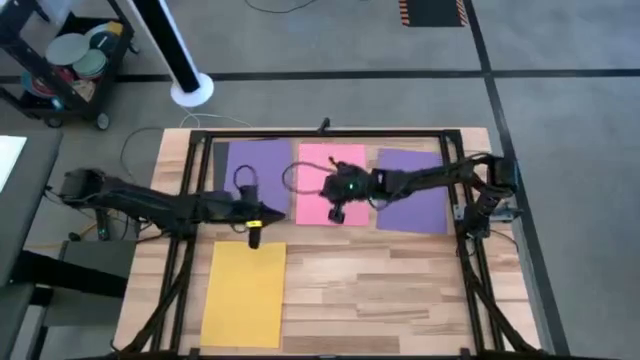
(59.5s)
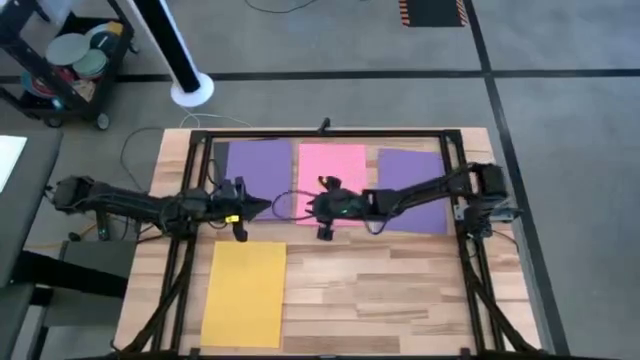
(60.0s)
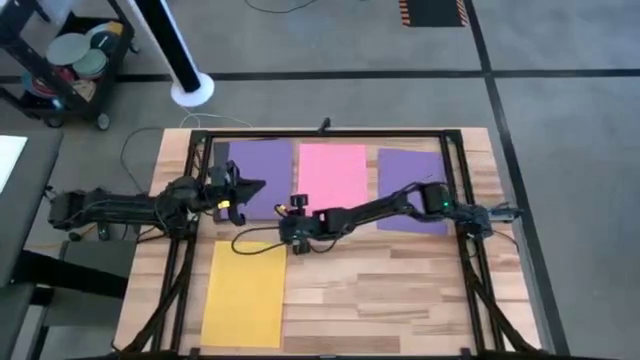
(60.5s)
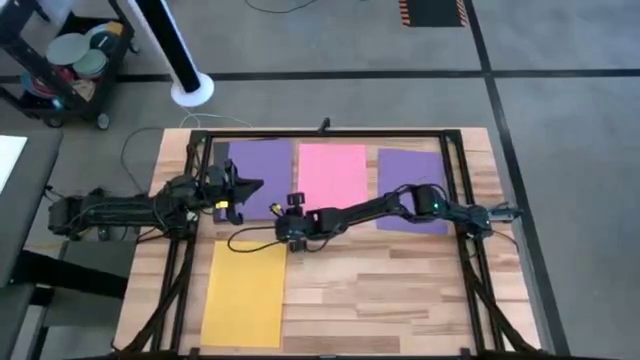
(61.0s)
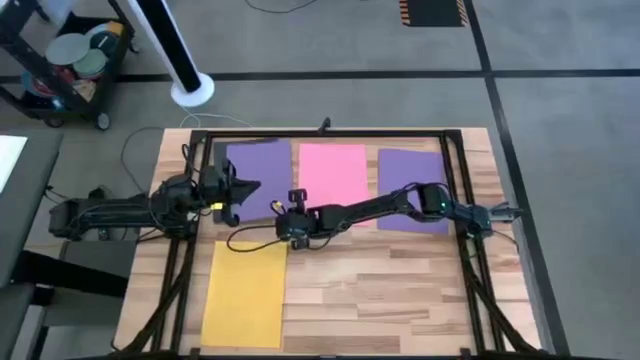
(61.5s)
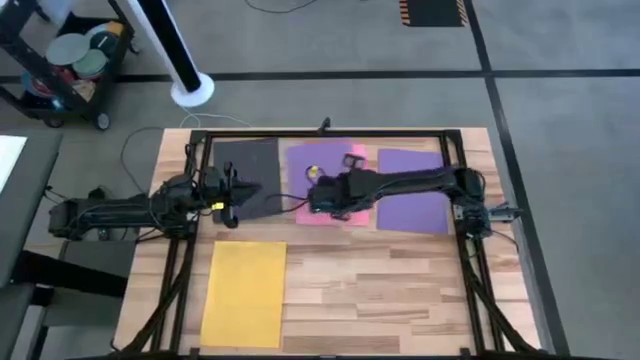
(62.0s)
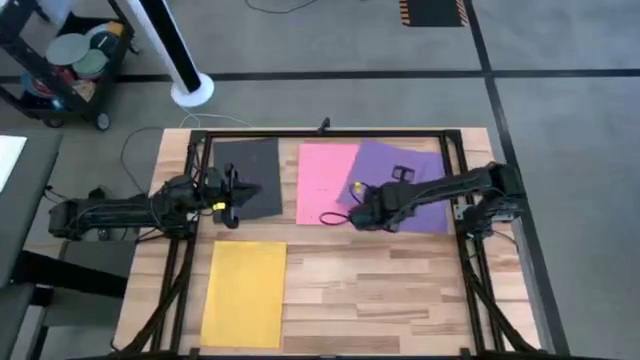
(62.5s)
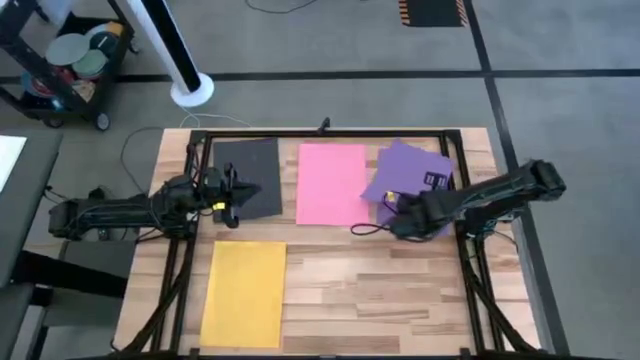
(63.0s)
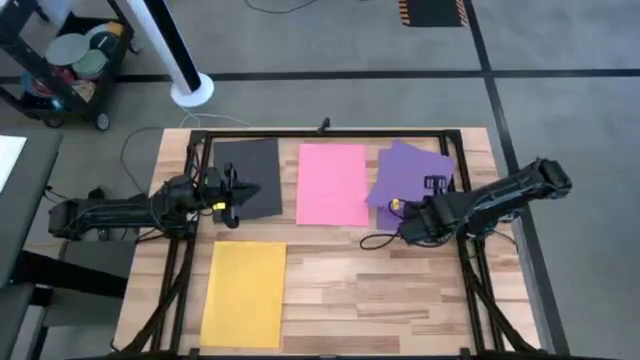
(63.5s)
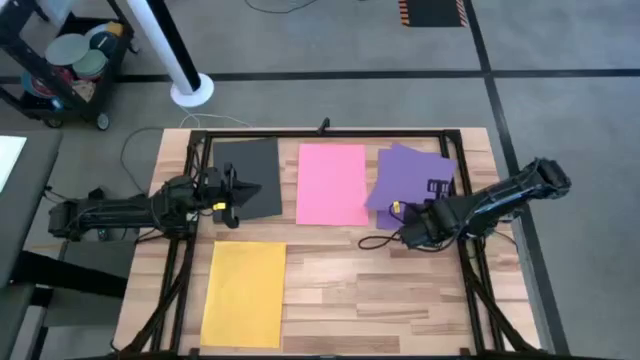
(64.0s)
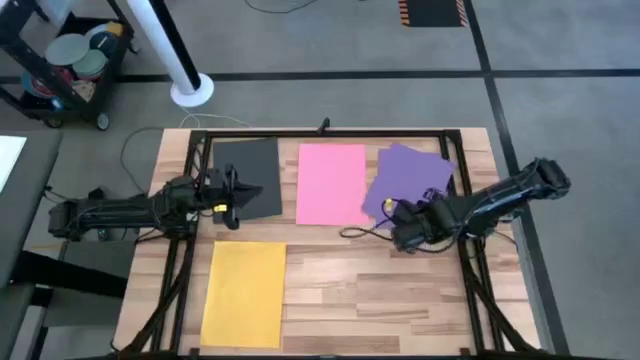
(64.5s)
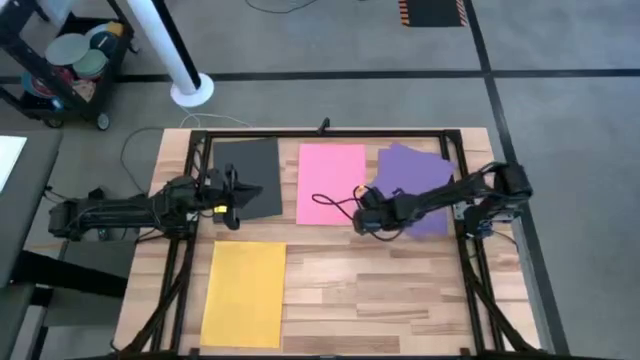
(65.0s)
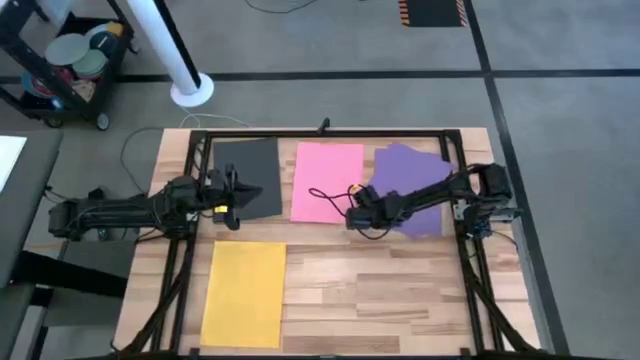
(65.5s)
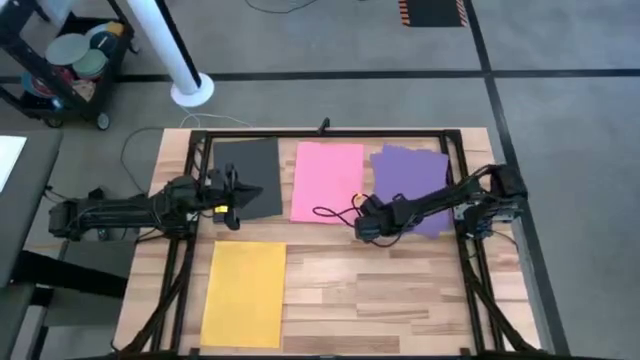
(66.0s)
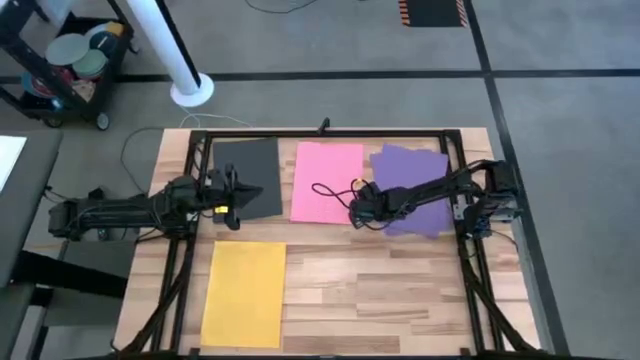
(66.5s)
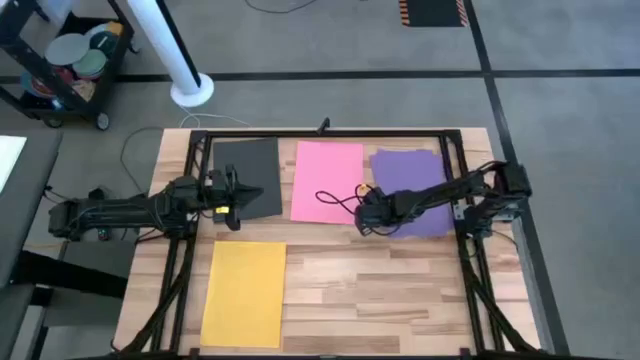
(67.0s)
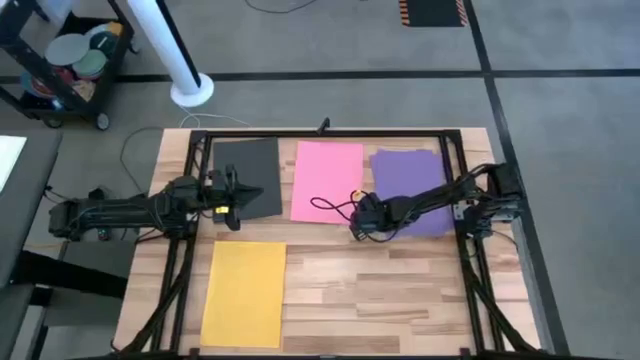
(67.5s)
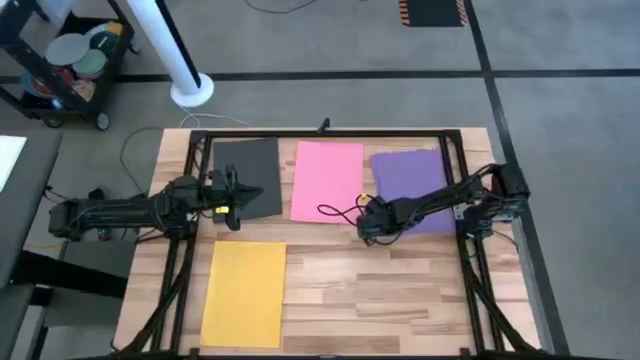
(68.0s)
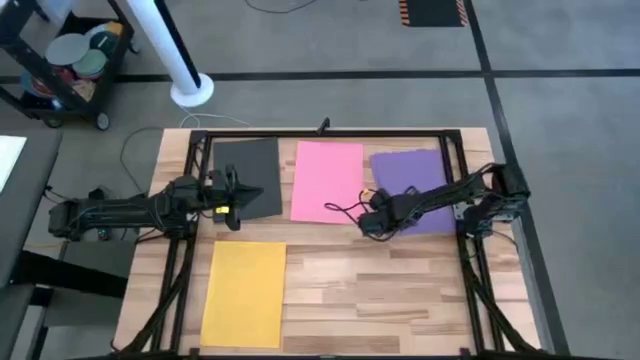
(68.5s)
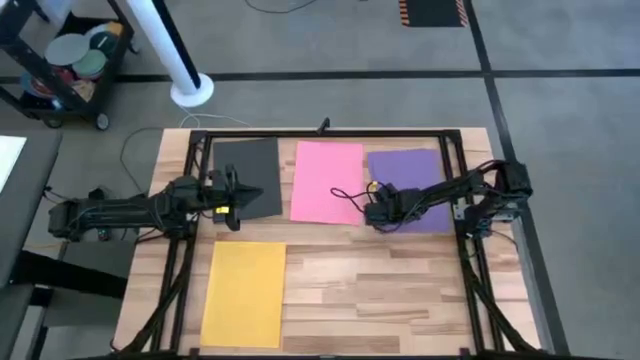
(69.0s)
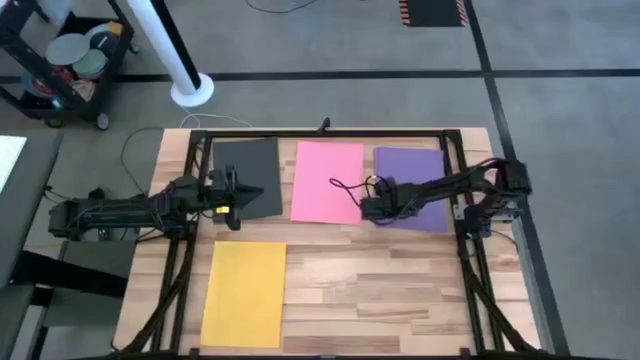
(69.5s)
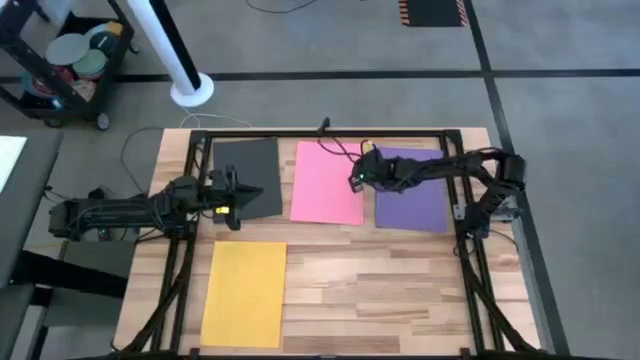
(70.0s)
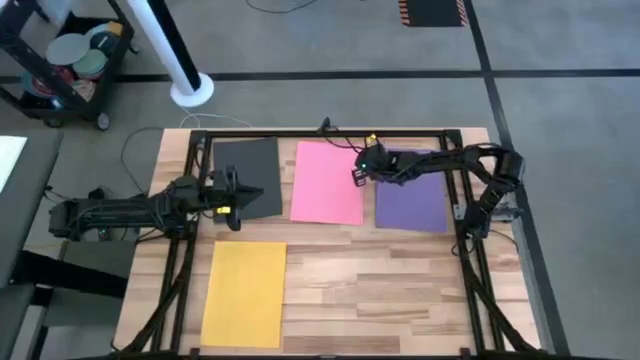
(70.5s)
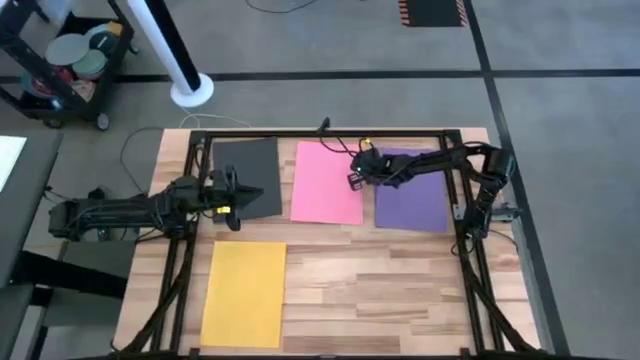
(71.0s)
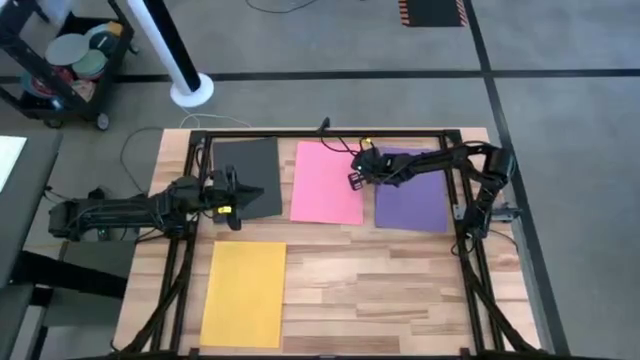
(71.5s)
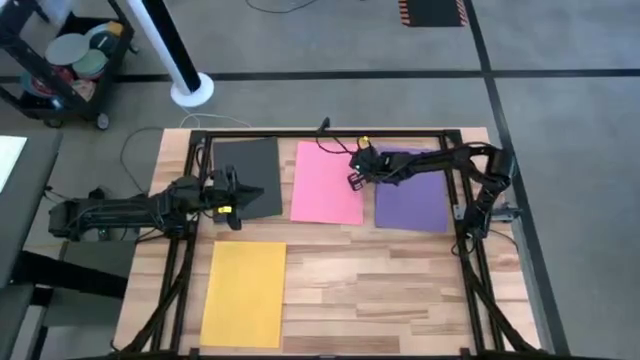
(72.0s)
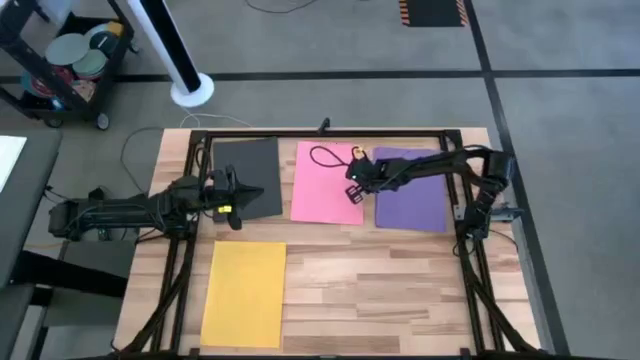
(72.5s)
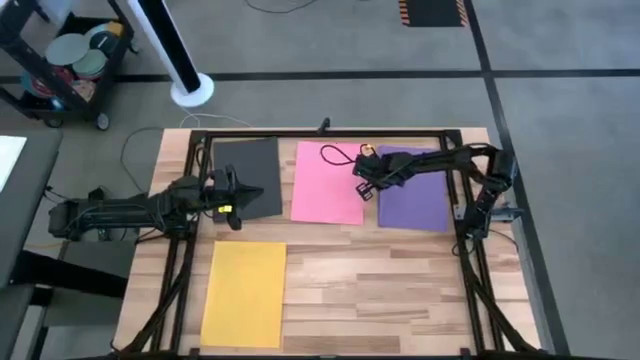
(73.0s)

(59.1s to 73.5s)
Task: Organize paper
Stack the purple paper on top of the purple paper

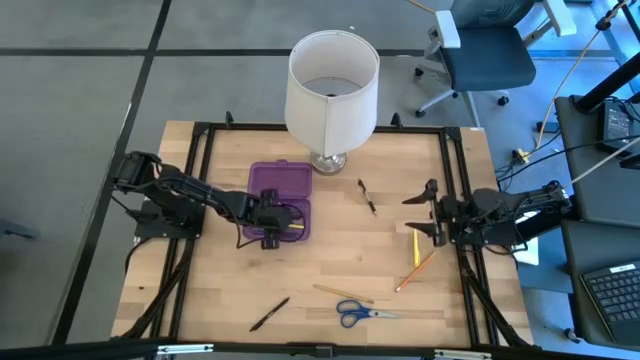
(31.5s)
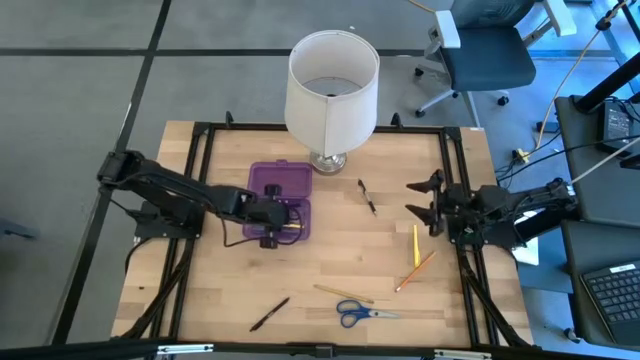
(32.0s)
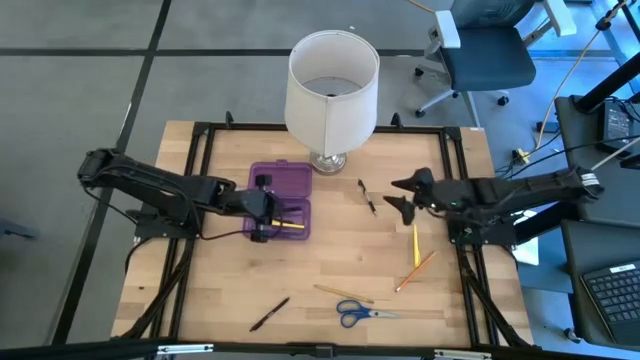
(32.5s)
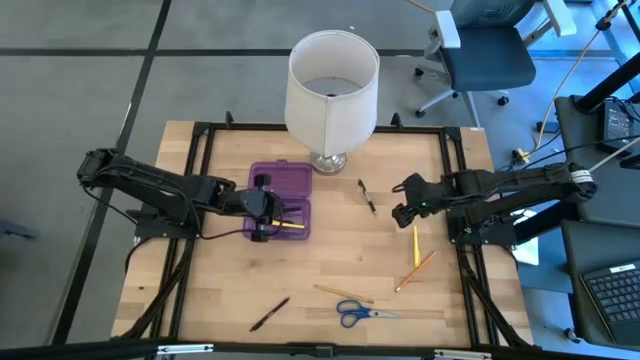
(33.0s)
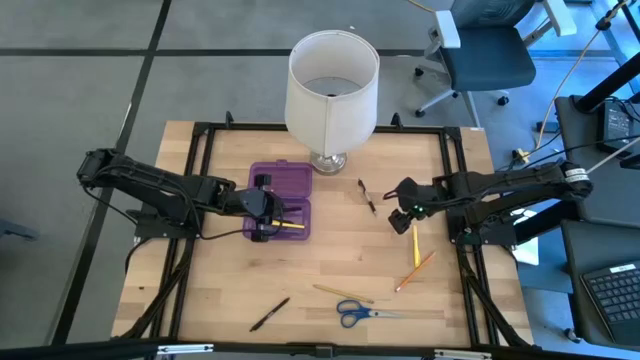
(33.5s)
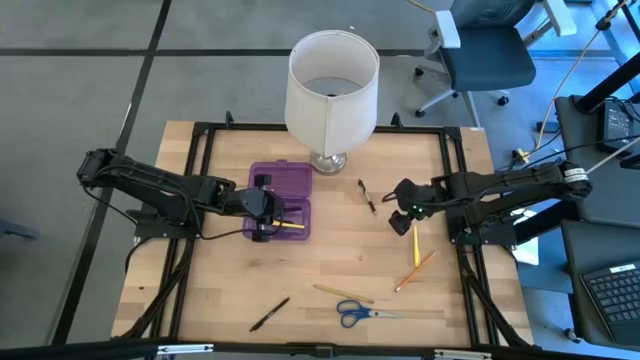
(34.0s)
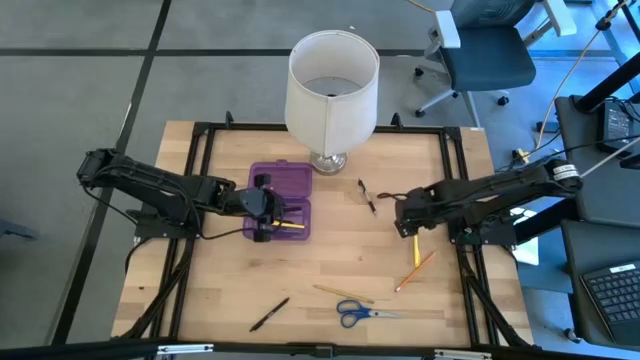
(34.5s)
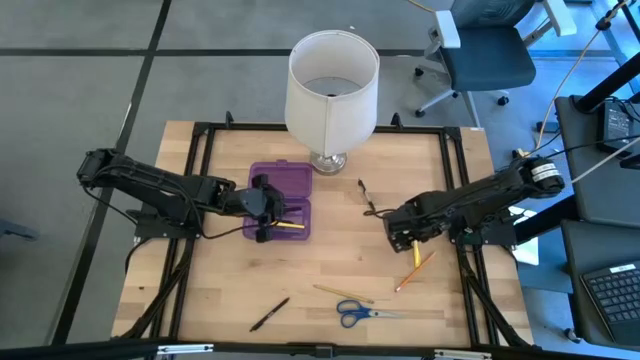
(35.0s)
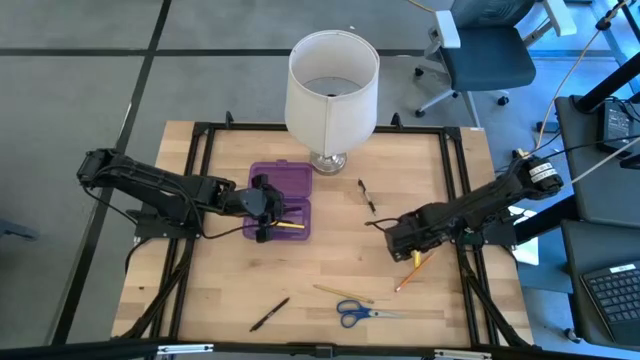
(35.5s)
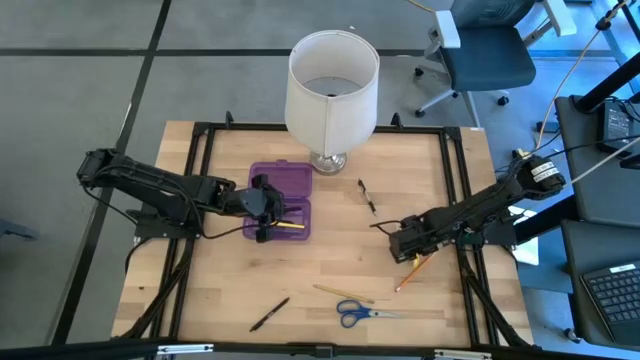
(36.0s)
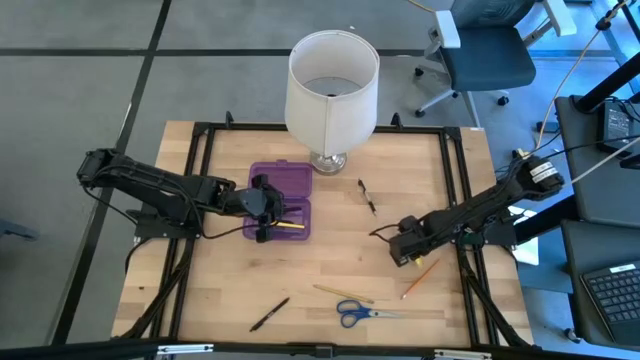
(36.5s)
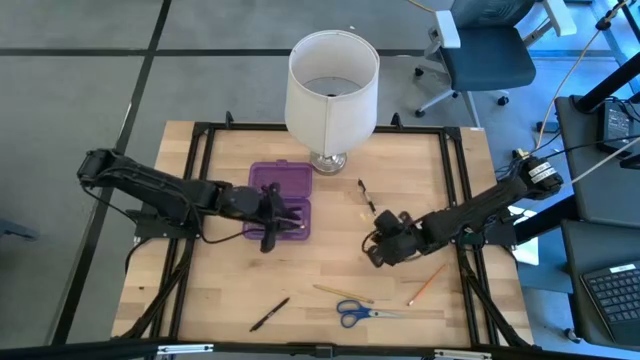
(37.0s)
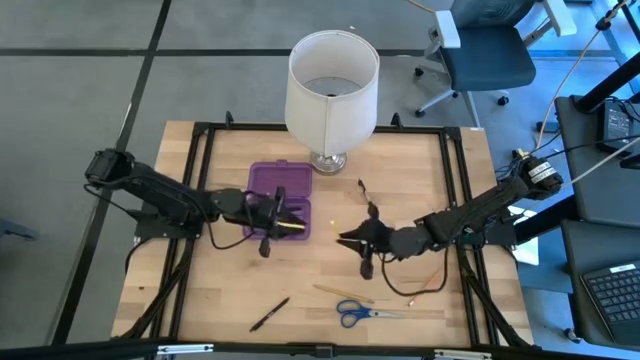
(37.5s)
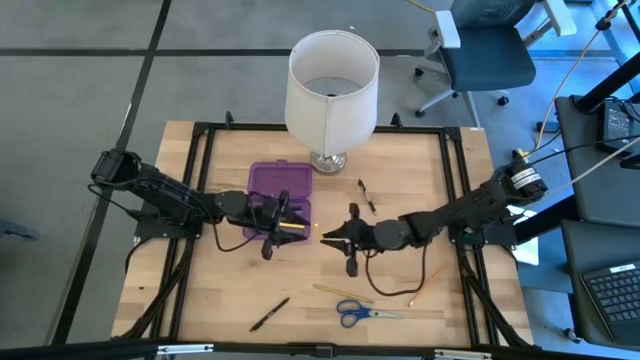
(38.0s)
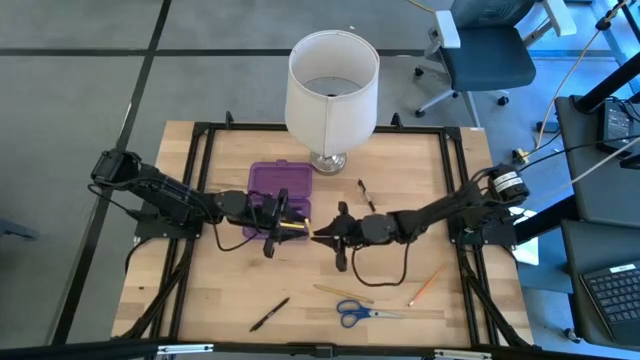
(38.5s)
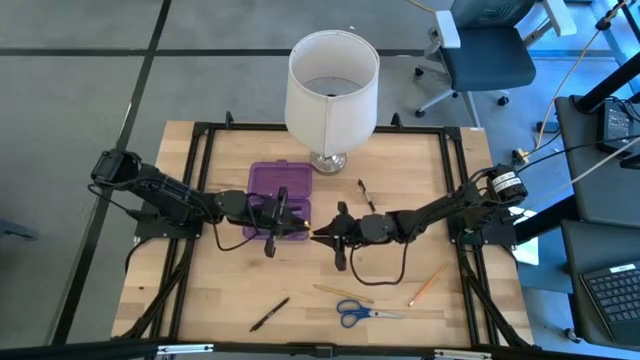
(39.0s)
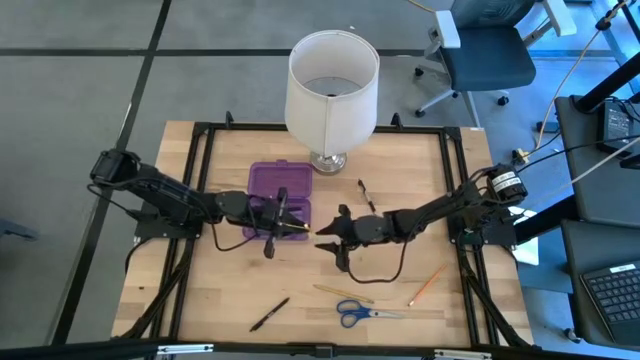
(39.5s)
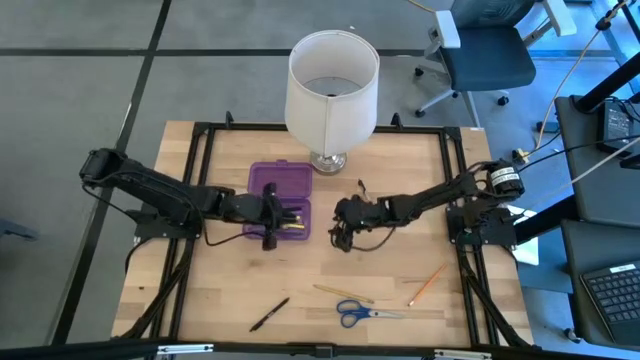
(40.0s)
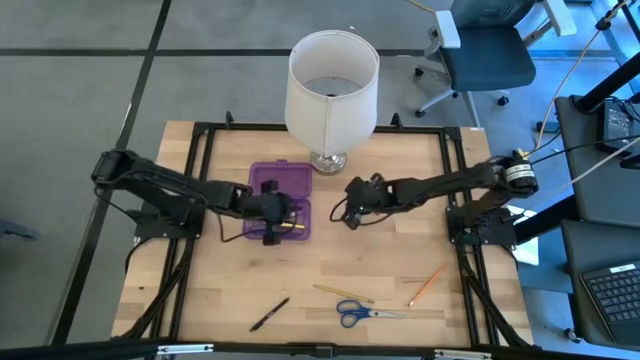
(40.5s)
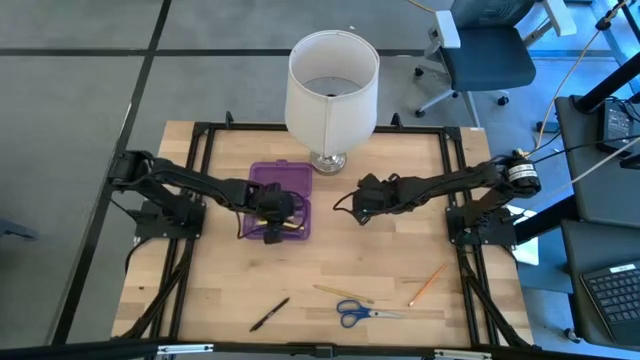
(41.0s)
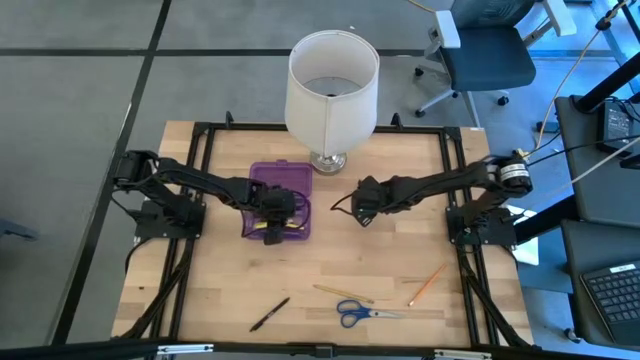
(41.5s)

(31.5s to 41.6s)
Task: Pick & place school supplies into a supply box
Put the yellow pen into the purple supply box
